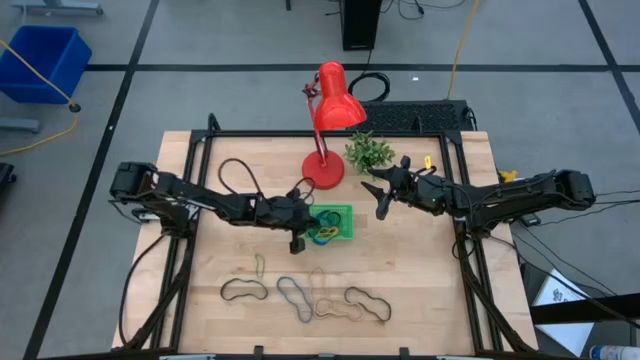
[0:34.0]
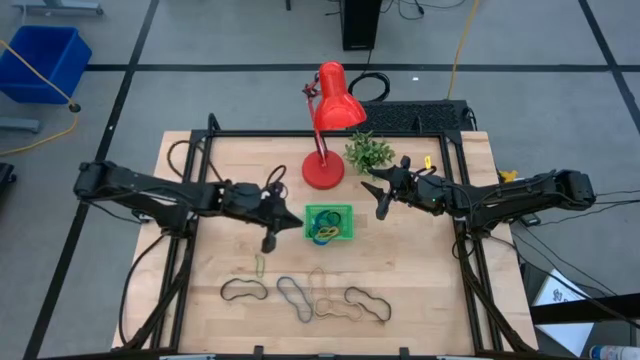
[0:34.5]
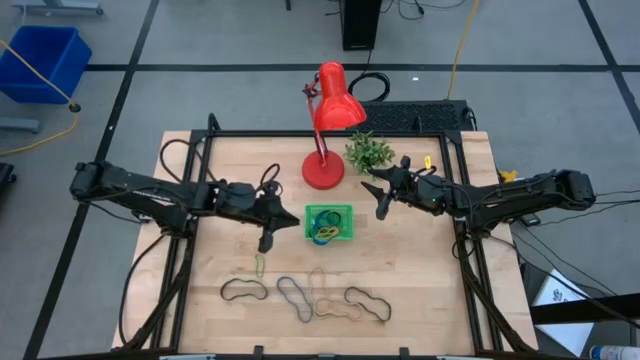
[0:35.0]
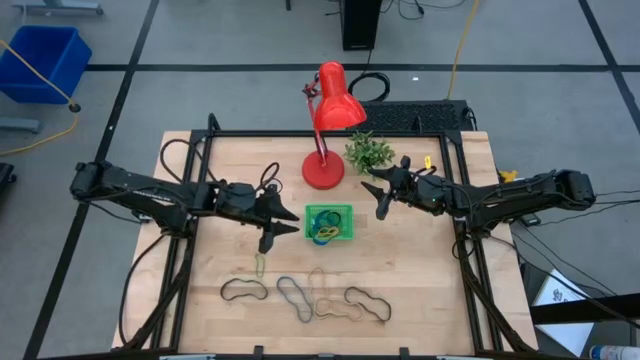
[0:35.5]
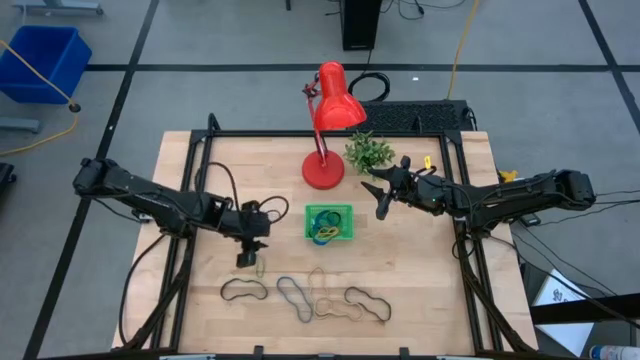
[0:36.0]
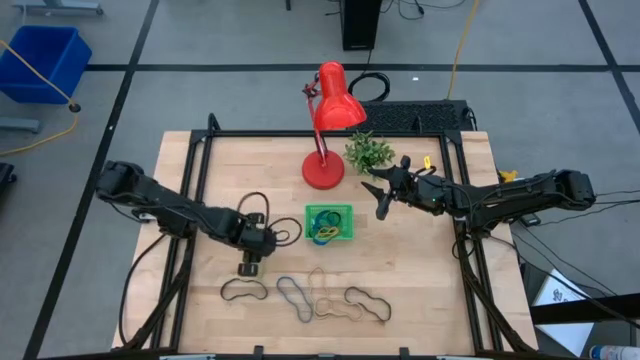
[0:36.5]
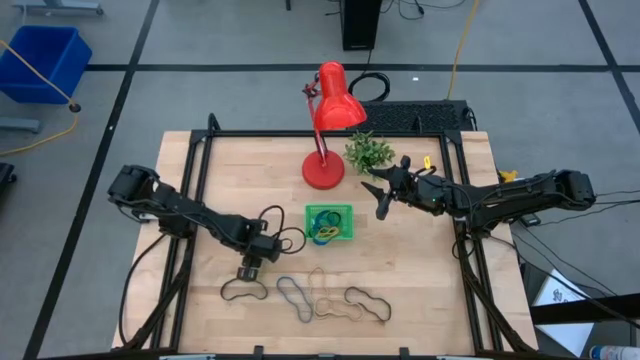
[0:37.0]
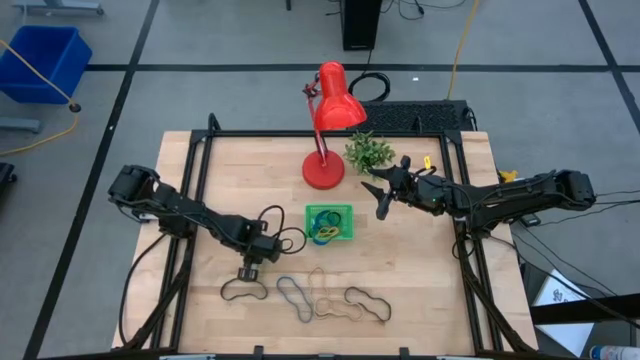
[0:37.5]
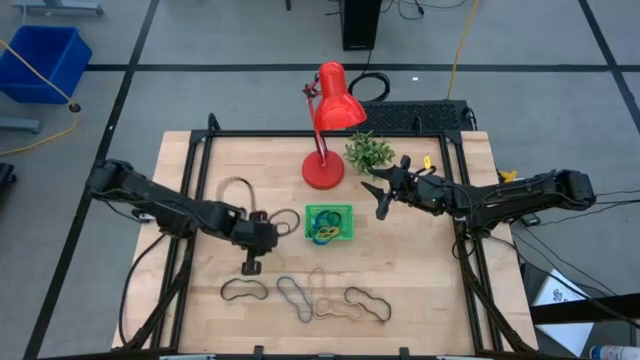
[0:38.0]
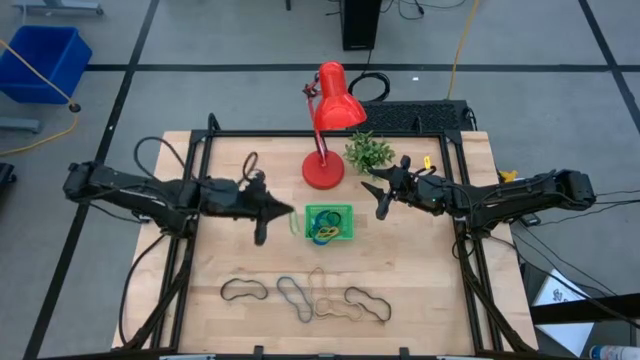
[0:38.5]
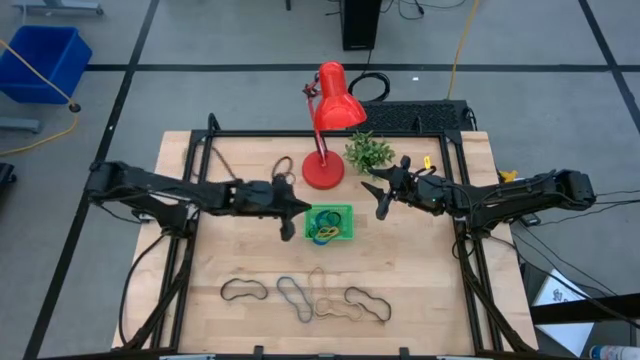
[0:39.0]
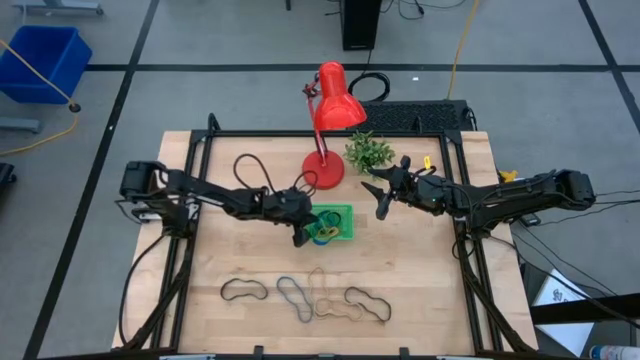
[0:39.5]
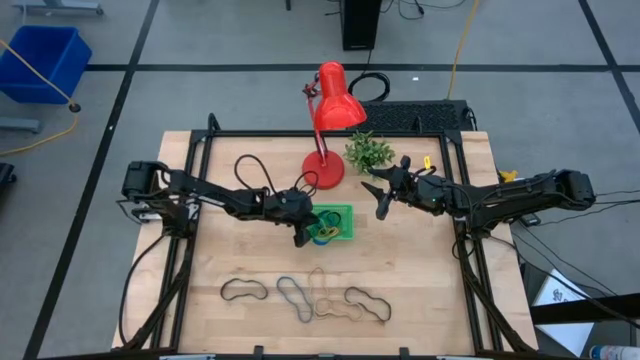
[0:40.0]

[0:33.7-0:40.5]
Task: Pick and place rubber bands into bin
Put the green rubber band into the green bin

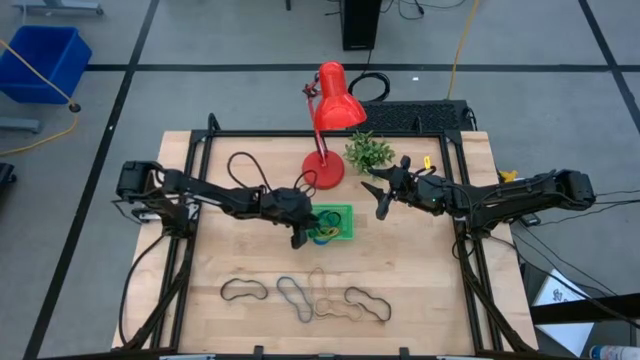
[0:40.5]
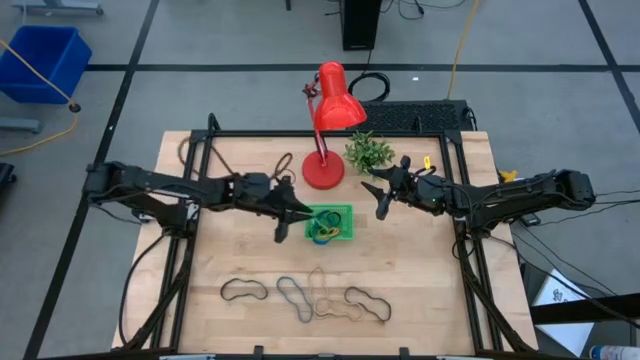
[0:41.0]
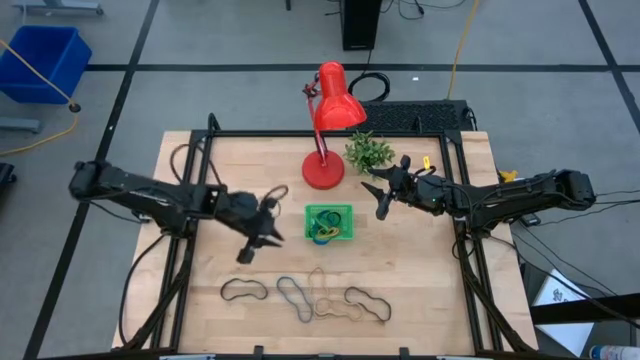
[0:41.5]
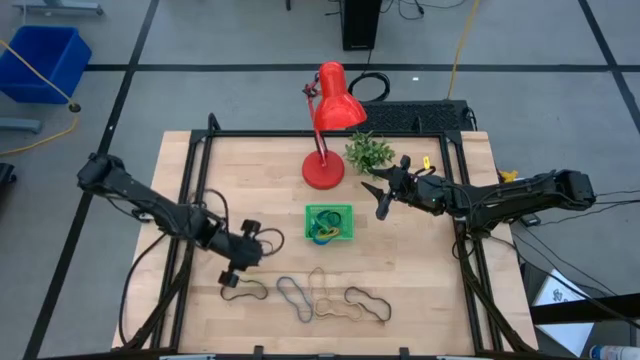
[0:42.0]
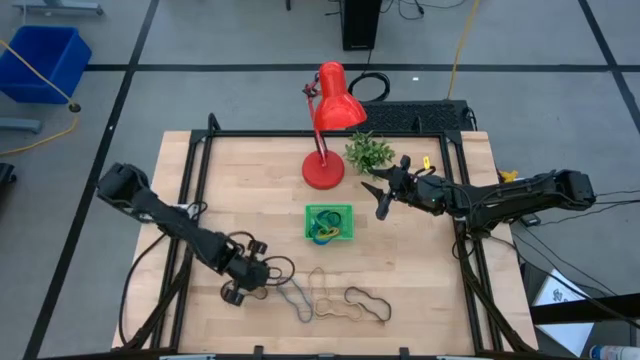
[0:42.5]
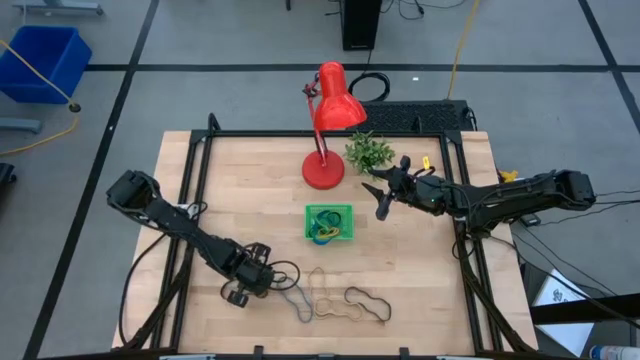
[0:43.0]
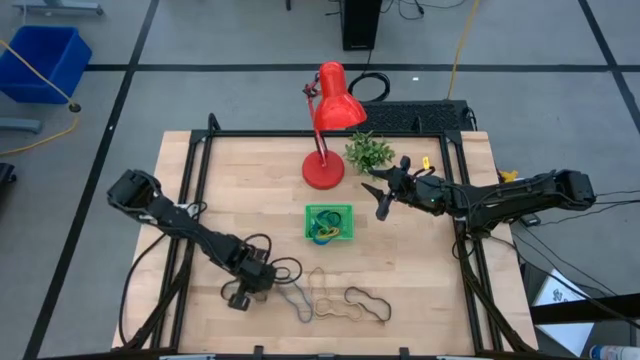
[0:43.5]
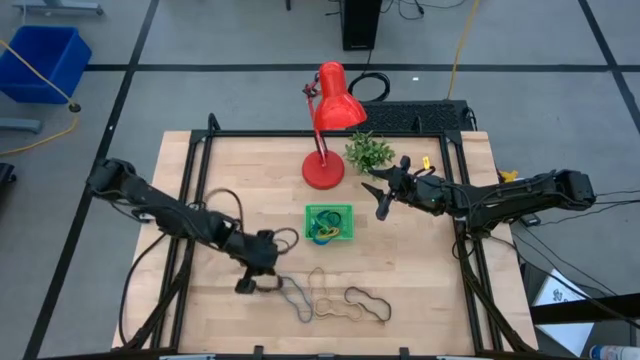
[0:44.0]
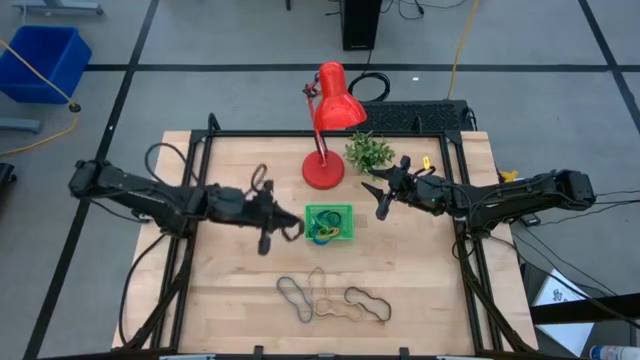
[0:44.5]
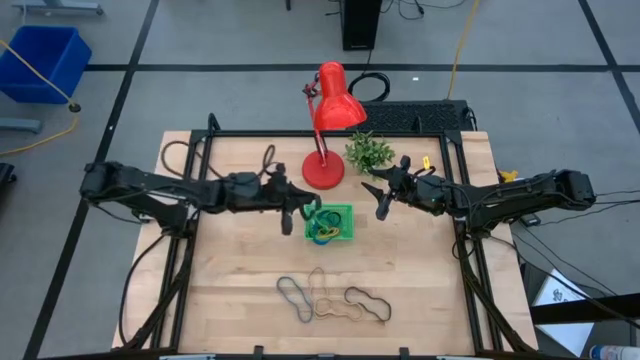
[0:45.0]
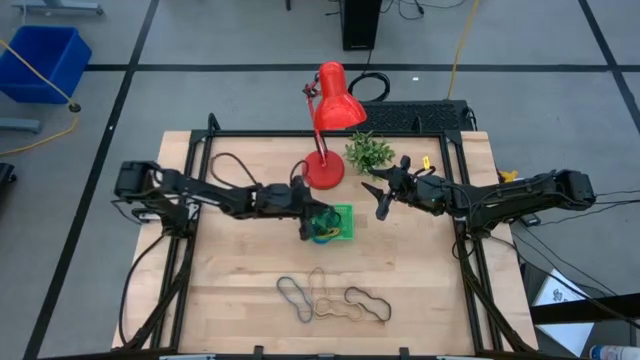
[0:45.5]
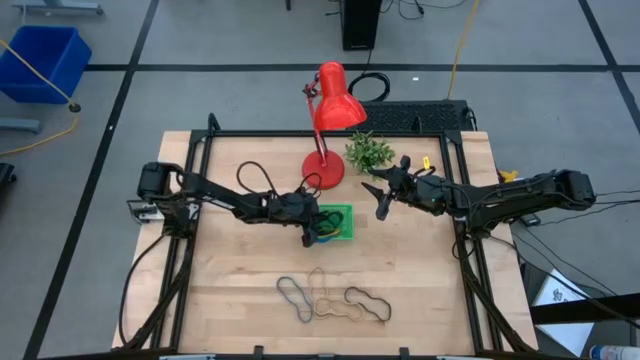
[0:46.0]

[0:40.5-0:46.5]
Put the left black rubber band into the green bin

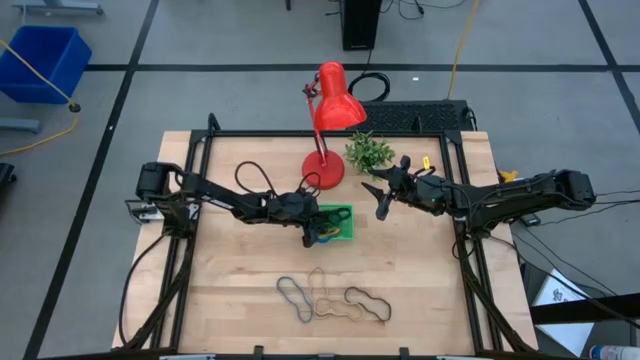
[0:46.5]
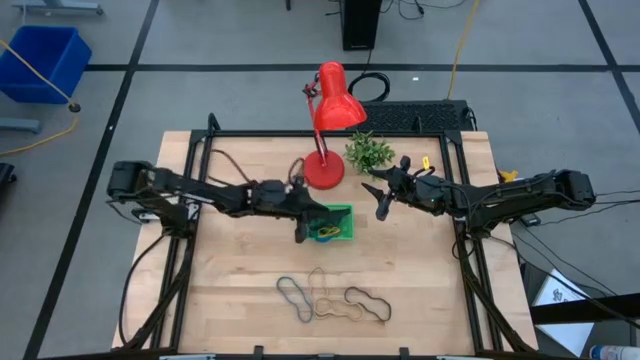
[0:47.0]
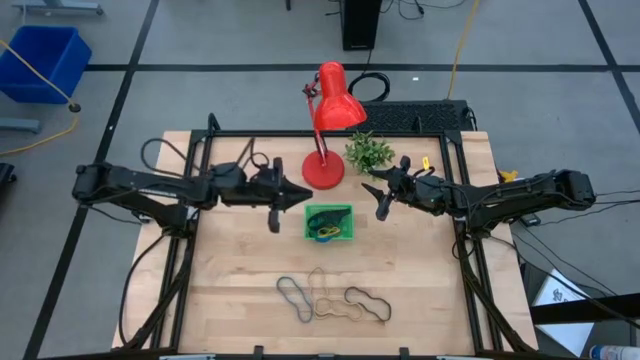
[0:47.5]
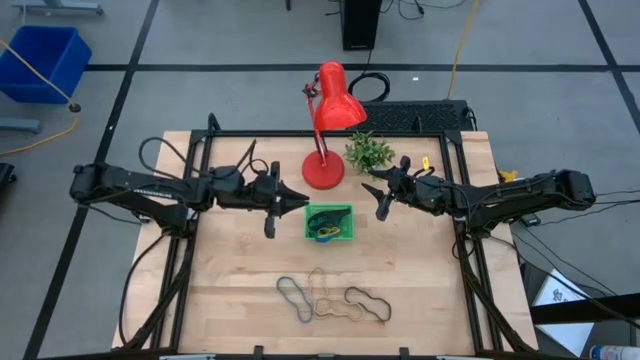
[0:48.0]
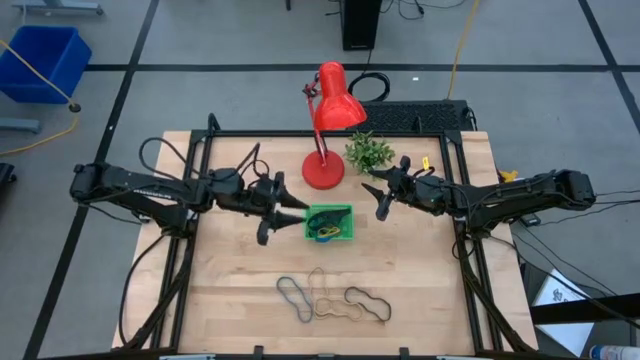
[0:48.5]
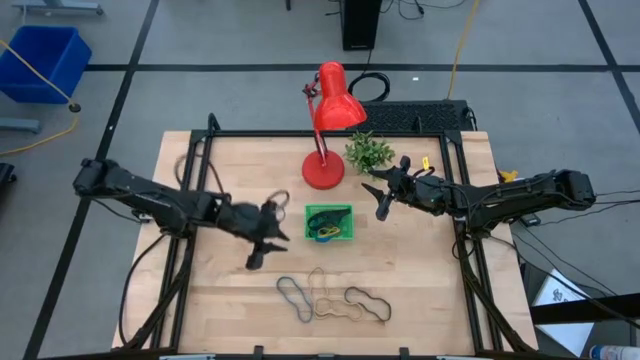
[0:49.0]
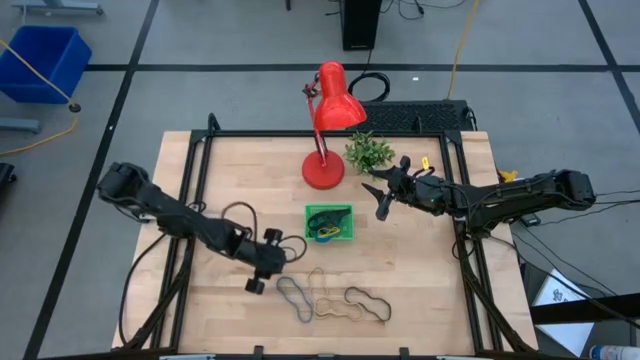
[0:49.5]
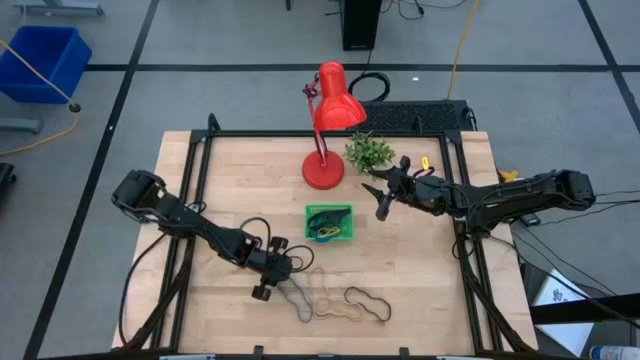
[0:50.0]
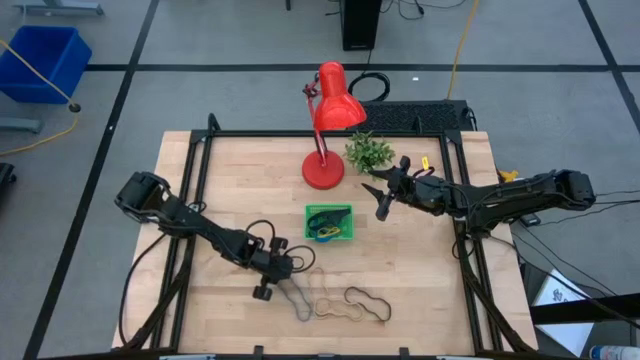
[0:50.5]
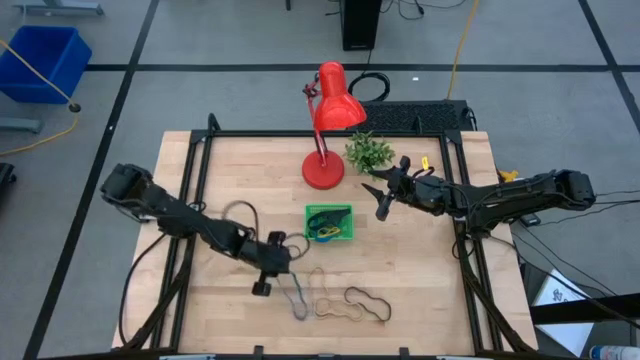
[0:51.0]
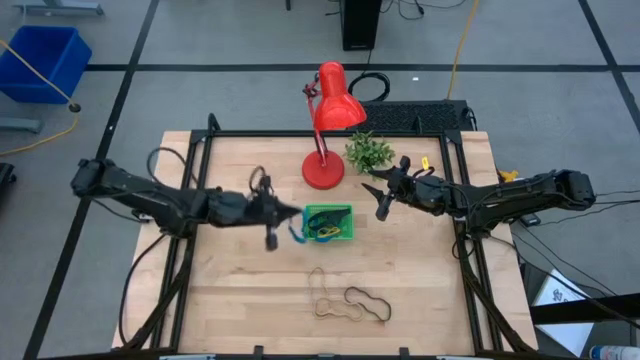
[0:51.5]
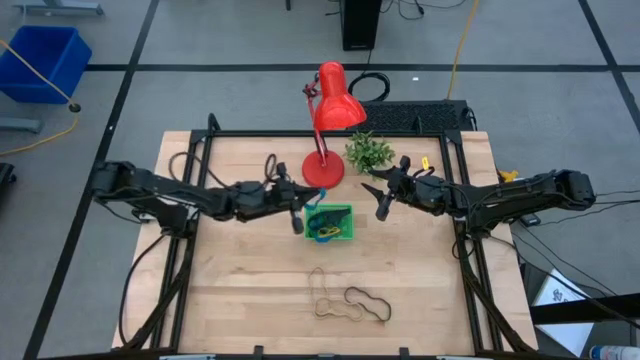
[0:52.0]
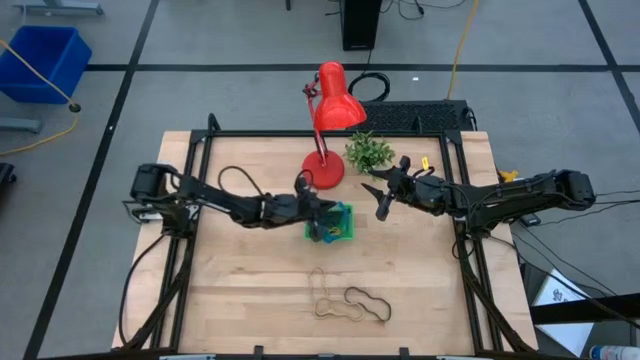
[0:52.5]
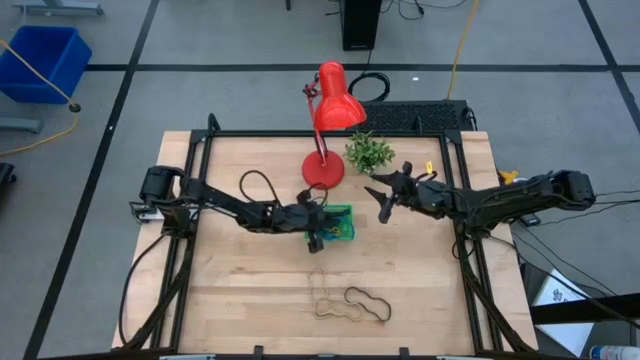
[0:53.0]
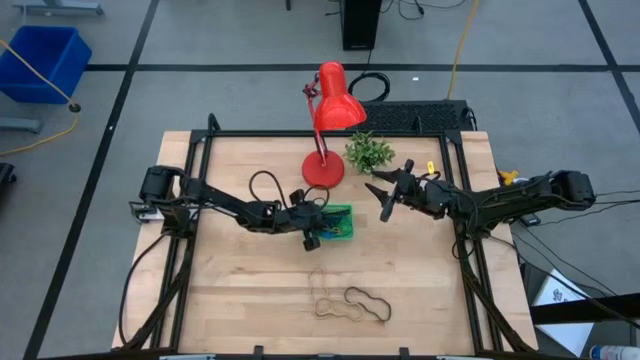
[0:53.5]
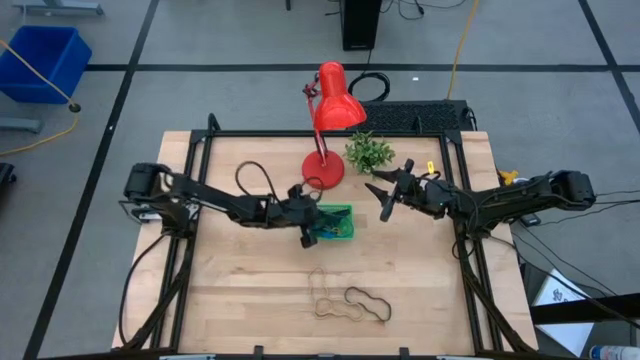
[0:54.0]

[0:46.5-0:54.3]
Put the blue rubber band into the green bin
